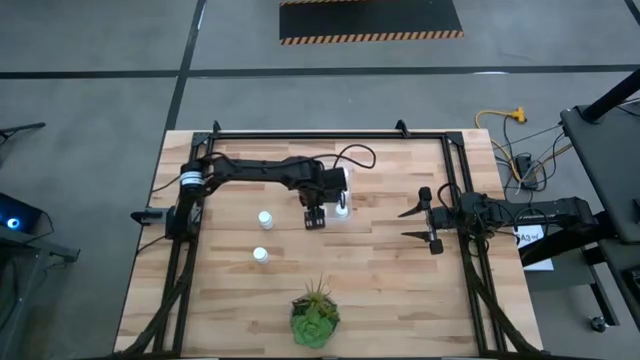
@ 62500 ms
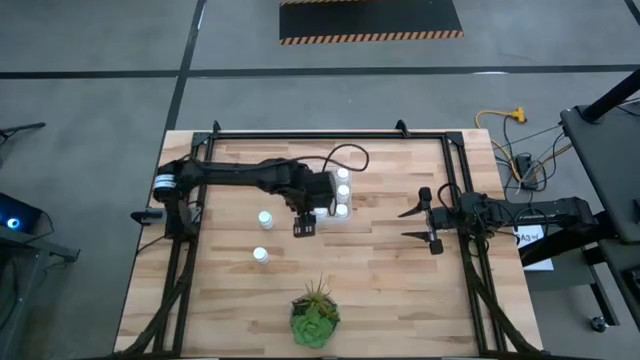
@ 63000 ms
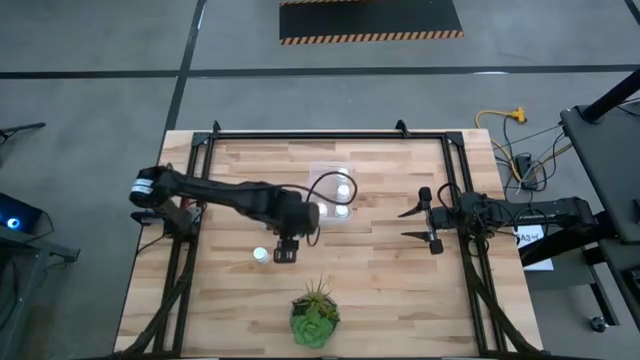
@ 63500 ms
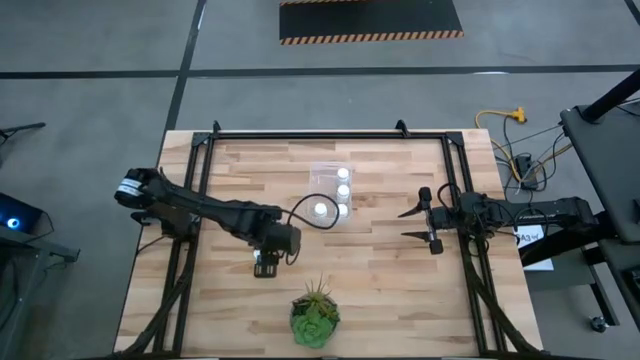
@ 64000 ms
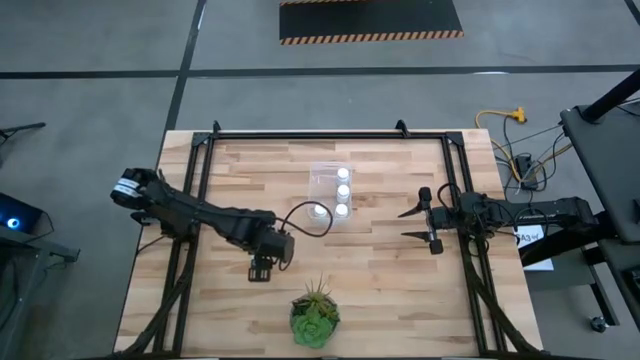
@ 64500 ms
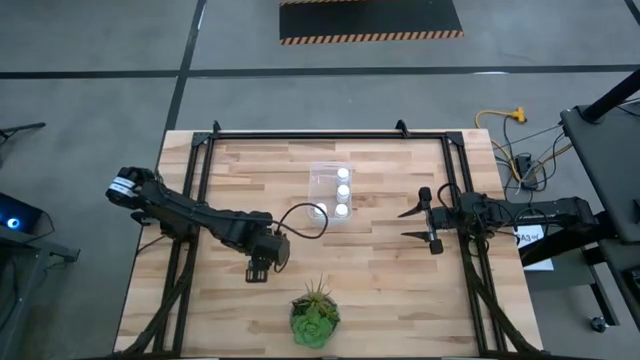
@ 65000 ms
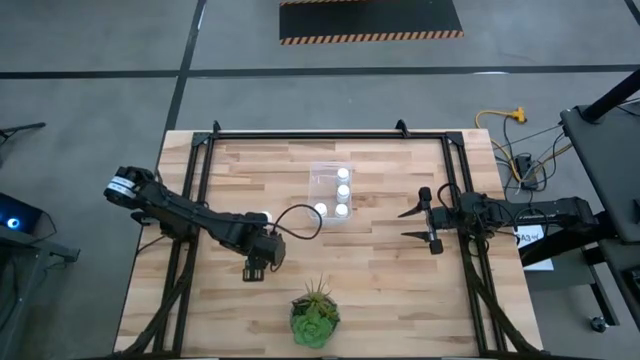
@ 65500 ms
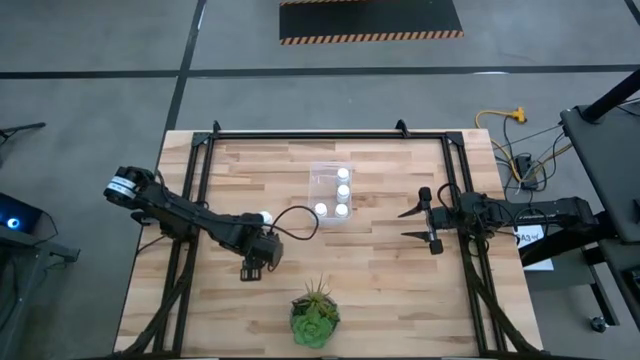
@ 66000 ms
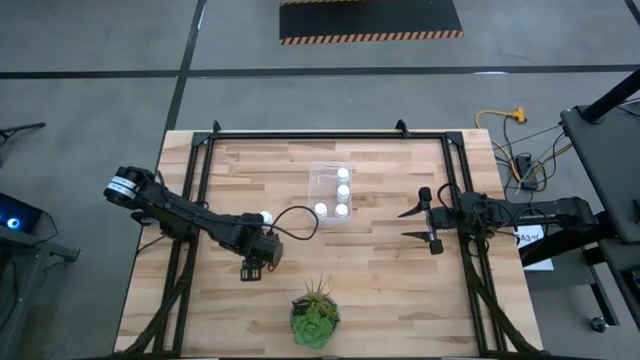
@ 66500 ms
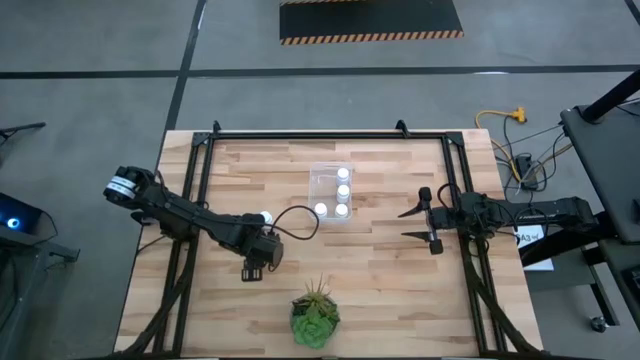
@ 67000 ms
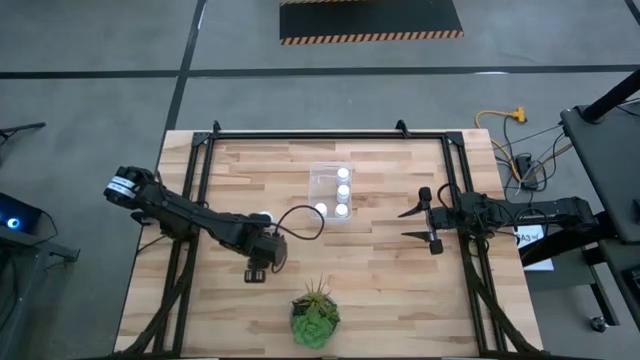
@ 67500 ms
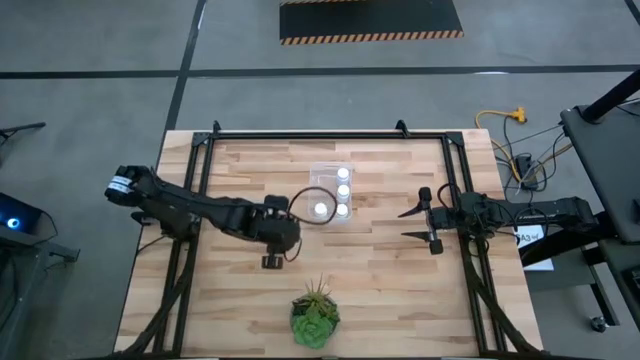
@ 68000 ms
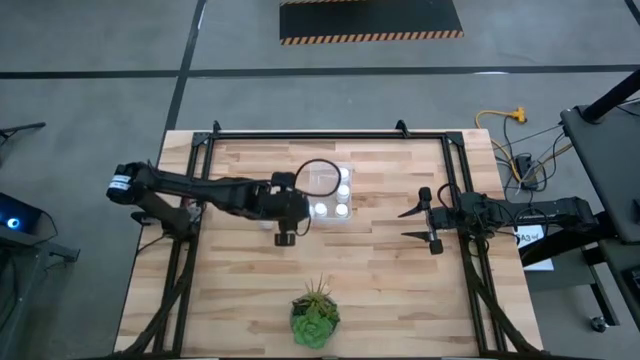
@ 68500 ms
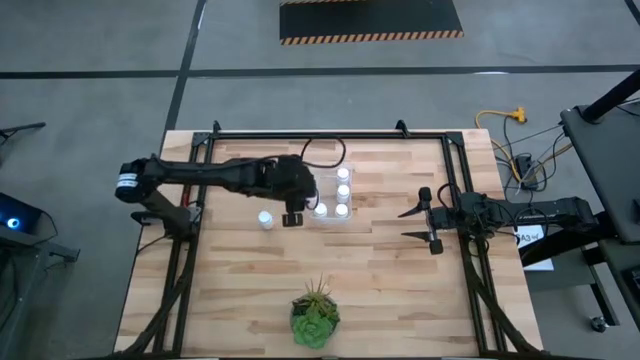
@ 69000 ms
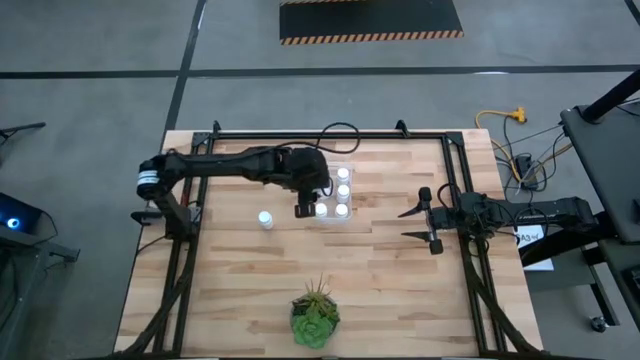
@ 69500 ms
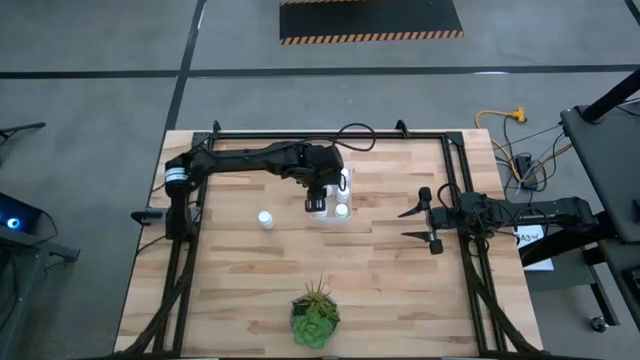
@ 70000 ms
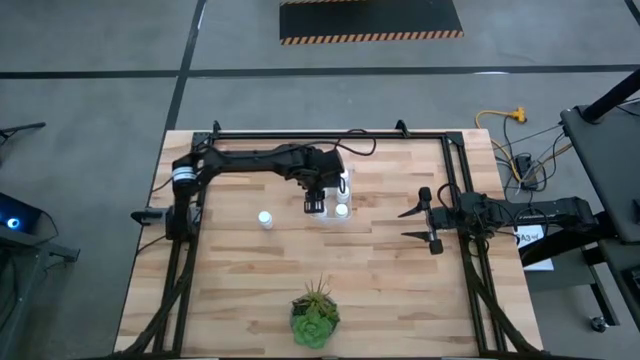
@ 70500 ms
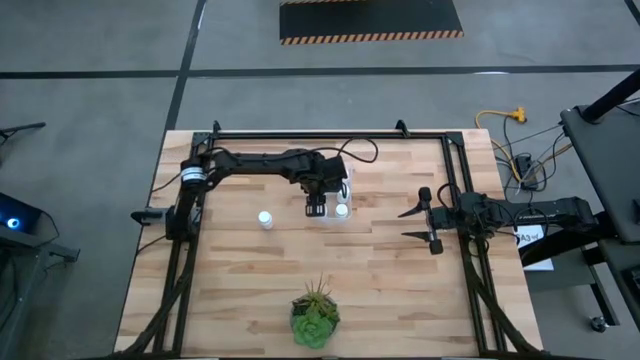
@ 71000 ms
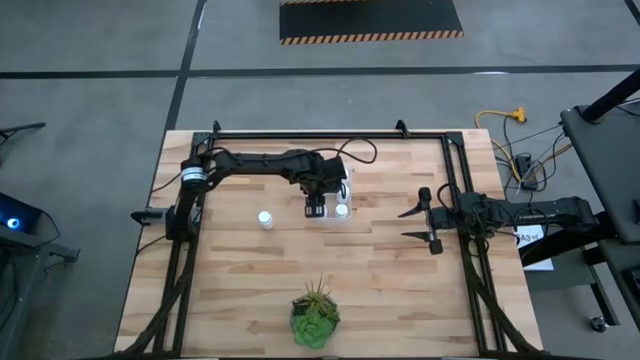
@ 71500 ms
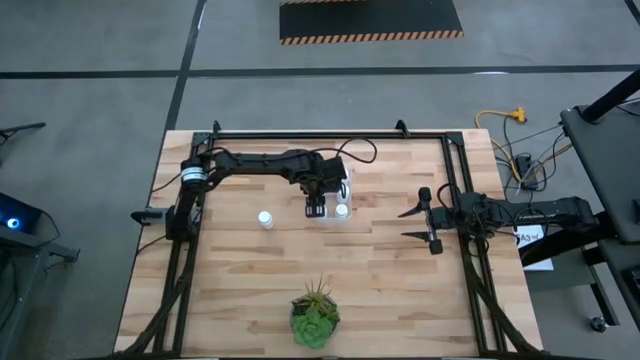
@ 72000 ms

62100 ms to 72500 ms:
Task: Pick and place pill bottles into a basket
Put the white pill bottle into the transparent bin

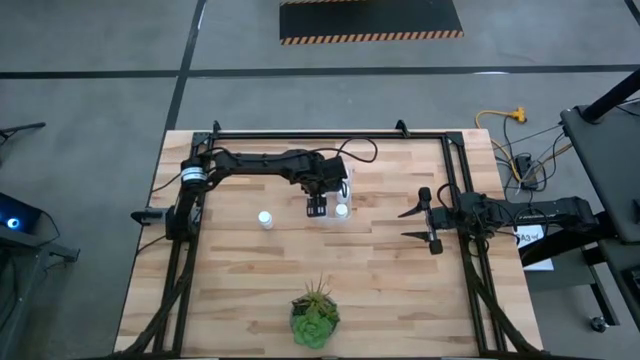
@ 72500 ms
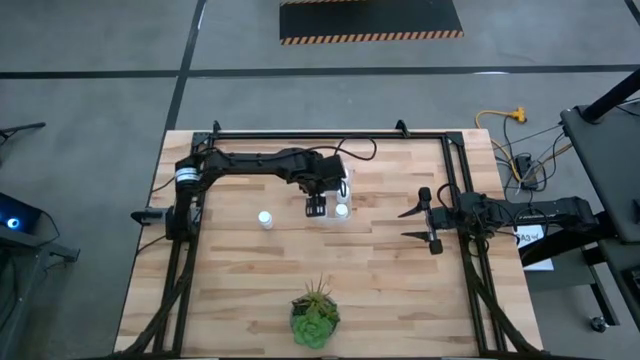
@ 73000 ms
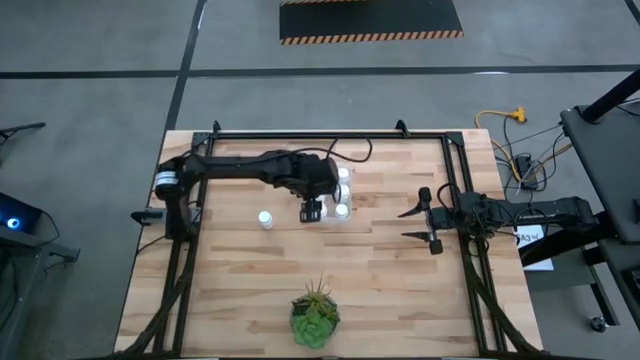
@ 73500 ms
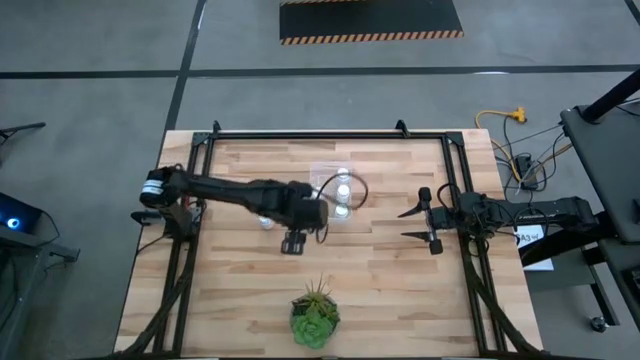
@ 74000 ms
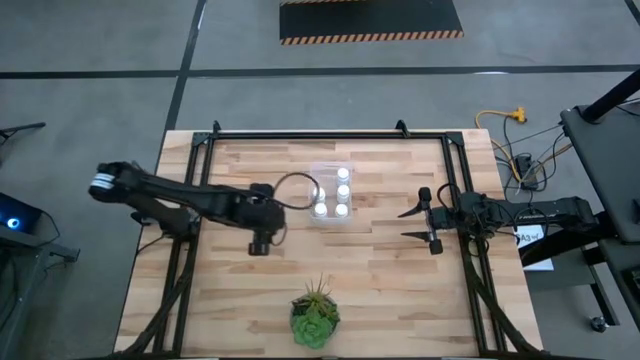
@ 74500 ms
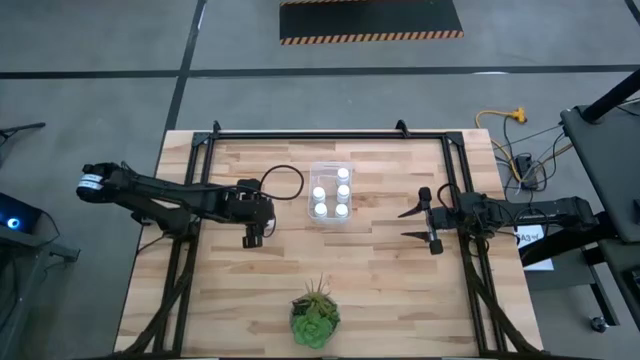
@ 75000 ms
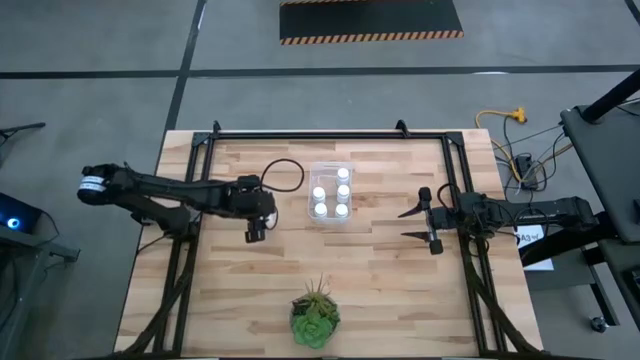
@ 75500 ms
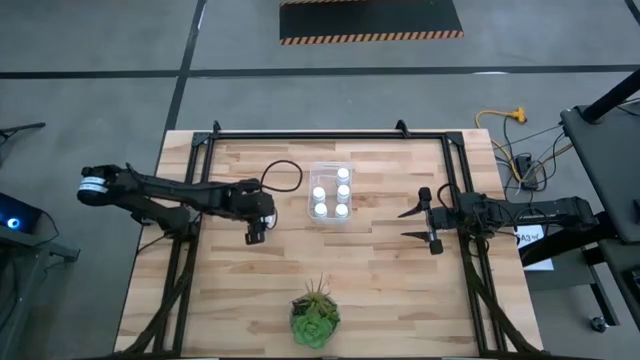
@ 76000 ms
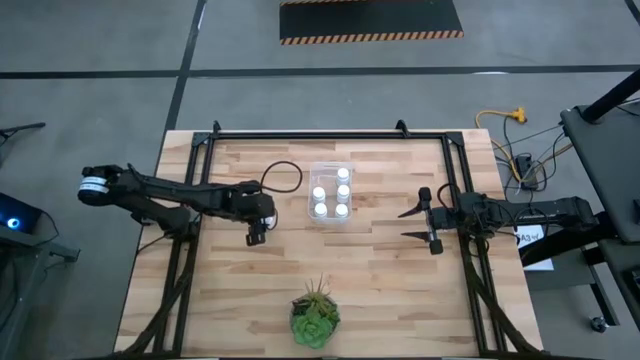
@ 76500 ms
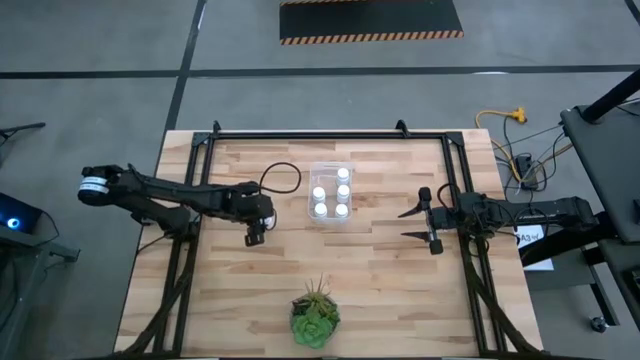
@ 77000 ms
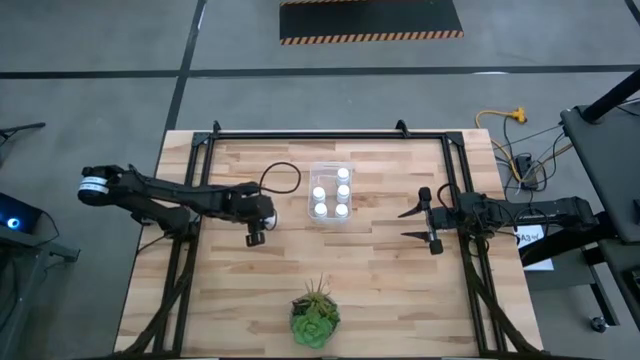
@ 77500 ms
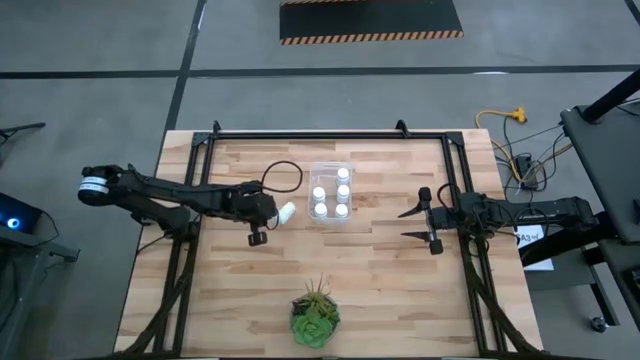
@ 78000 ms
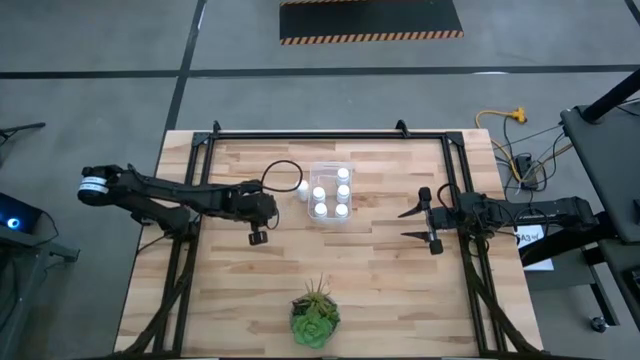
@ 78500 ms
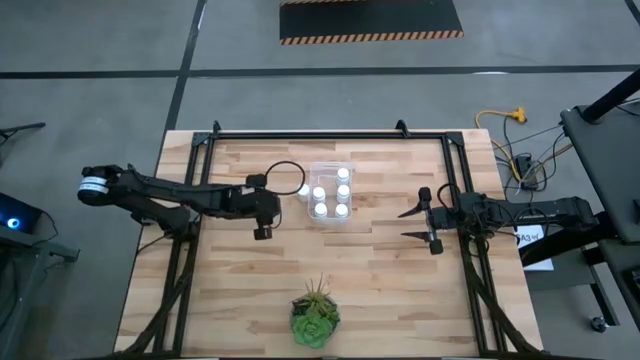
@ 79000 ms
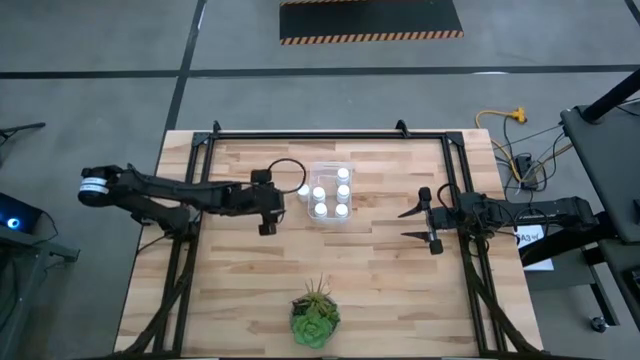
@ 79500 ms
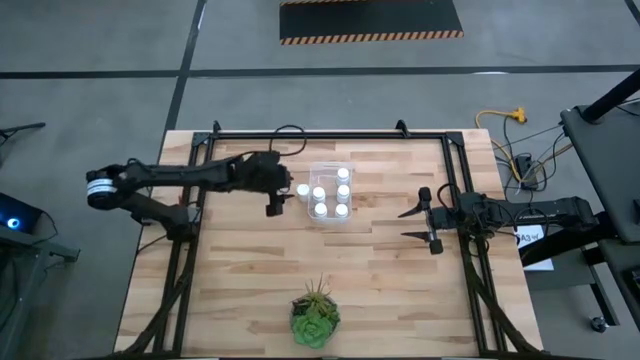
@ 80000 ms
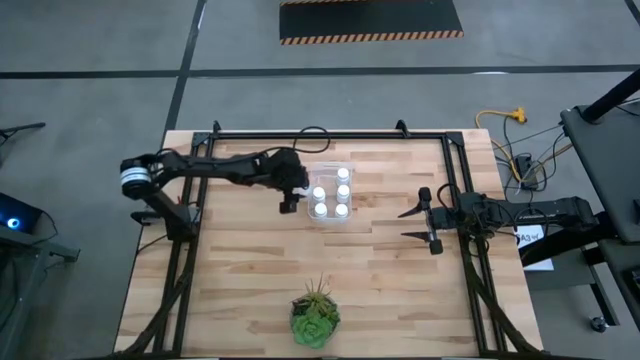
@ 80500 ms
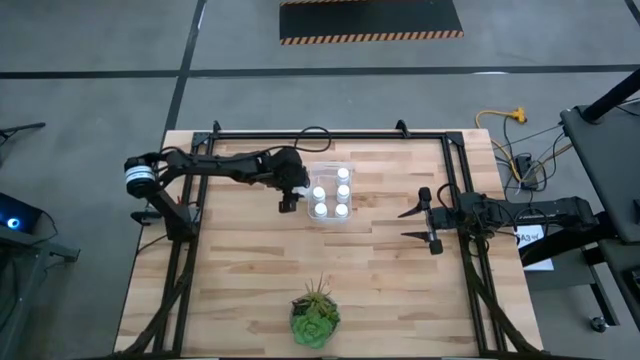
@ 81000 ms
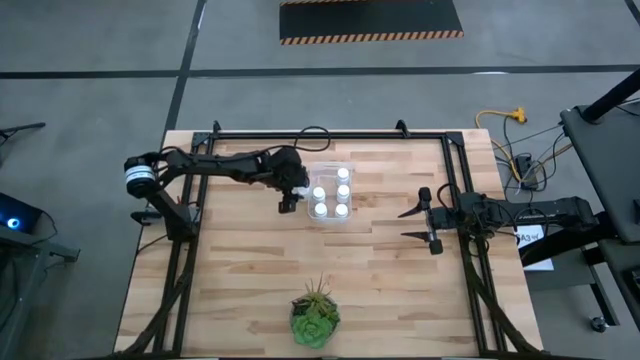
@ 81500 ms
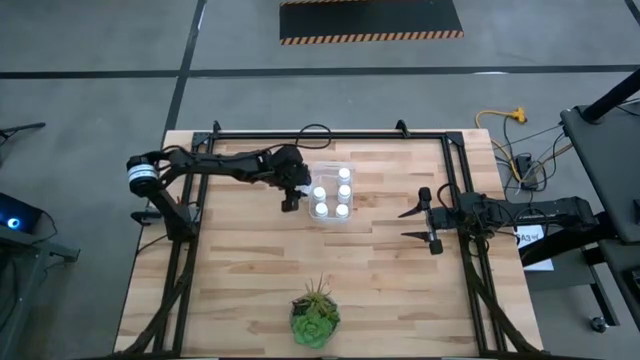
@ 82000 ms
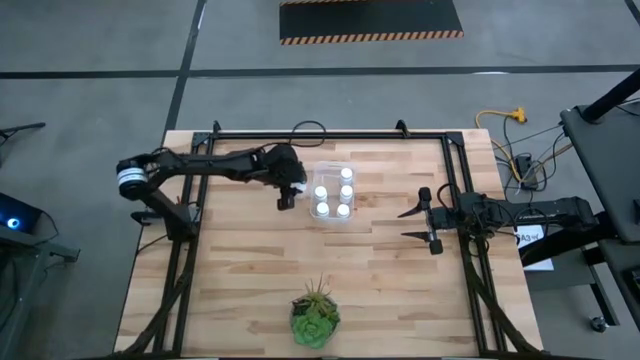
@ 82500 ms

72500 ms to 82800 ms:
Put the white pill bottle into the transparent bin
